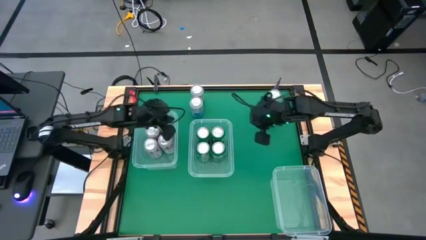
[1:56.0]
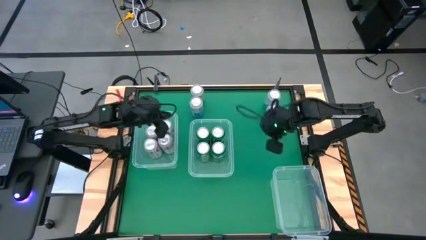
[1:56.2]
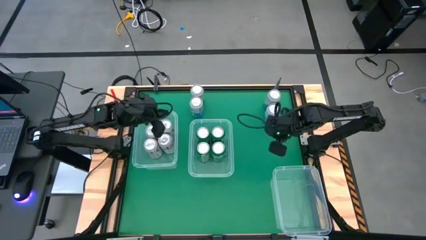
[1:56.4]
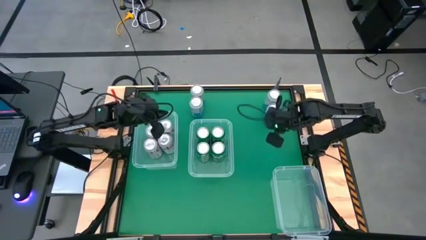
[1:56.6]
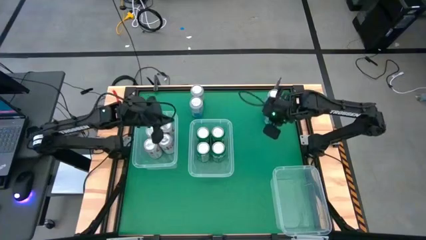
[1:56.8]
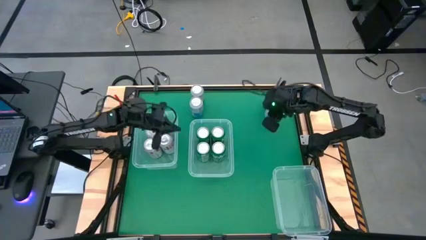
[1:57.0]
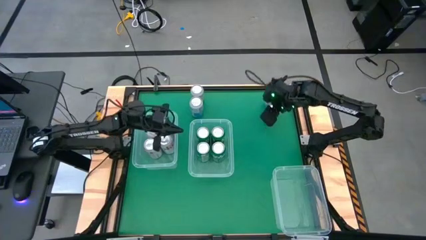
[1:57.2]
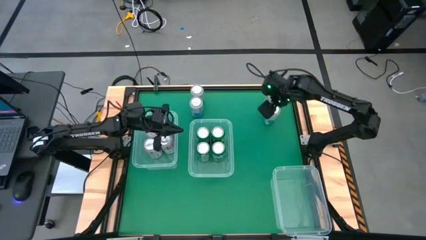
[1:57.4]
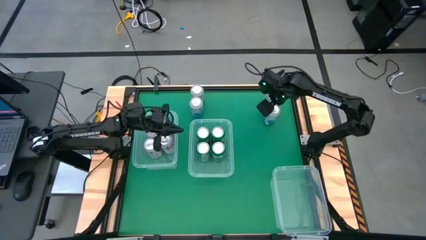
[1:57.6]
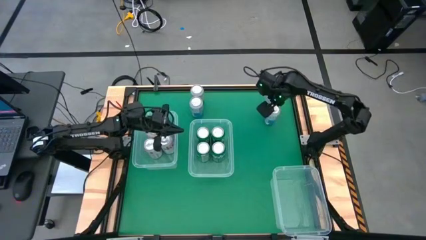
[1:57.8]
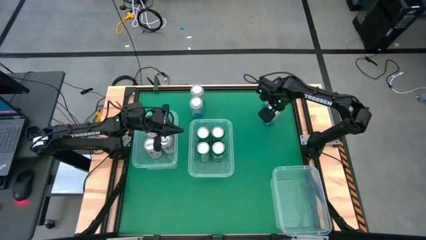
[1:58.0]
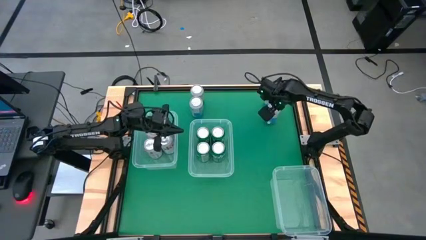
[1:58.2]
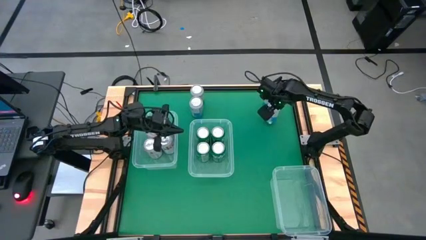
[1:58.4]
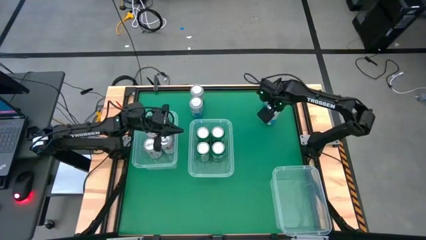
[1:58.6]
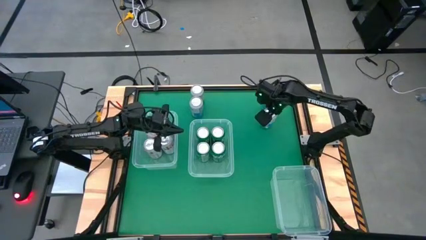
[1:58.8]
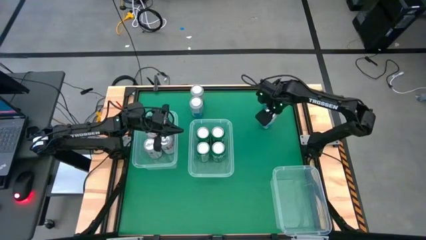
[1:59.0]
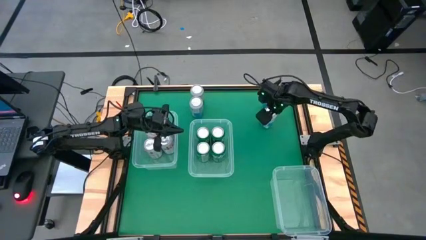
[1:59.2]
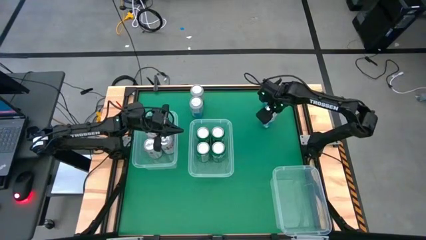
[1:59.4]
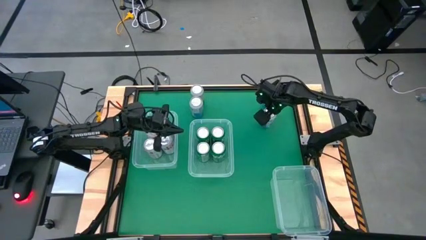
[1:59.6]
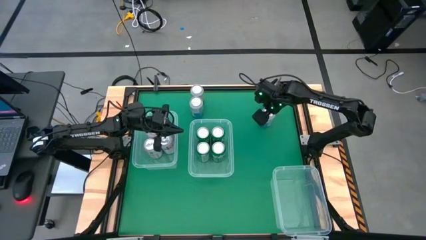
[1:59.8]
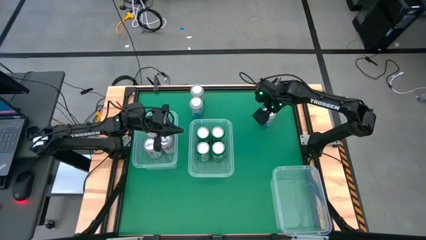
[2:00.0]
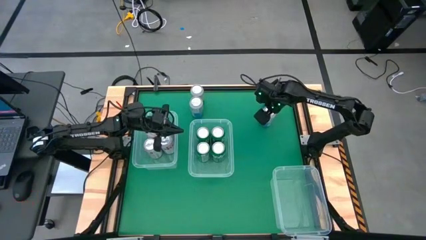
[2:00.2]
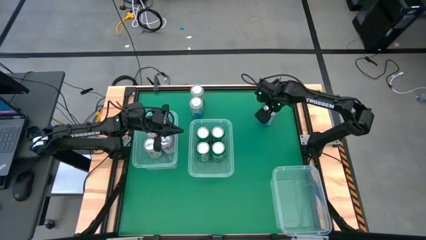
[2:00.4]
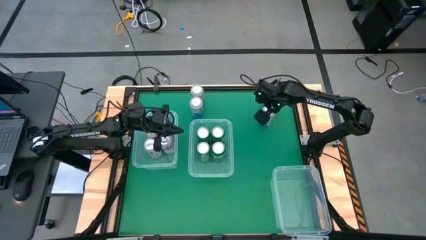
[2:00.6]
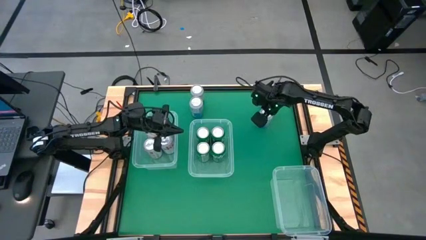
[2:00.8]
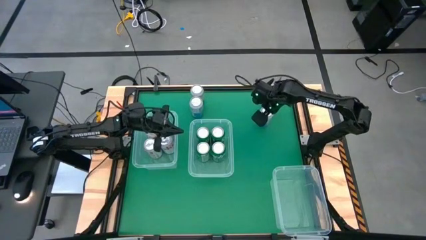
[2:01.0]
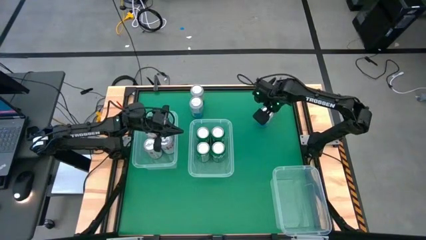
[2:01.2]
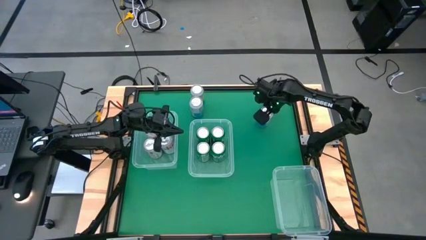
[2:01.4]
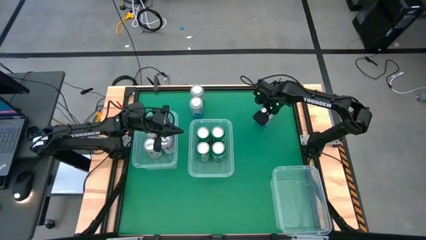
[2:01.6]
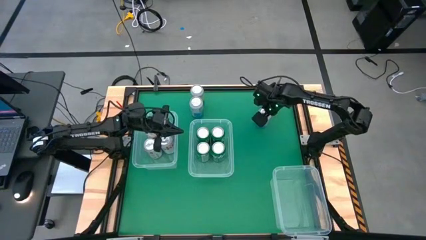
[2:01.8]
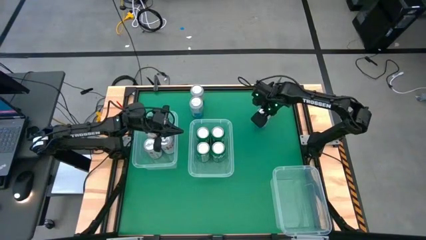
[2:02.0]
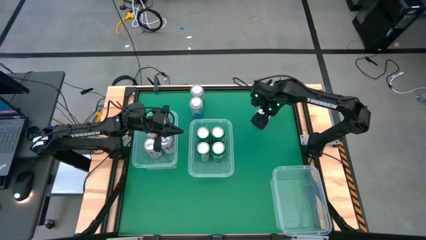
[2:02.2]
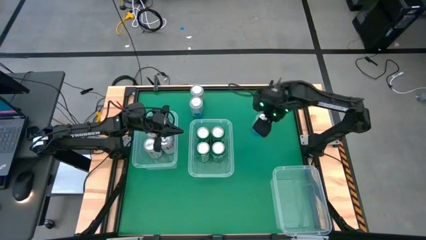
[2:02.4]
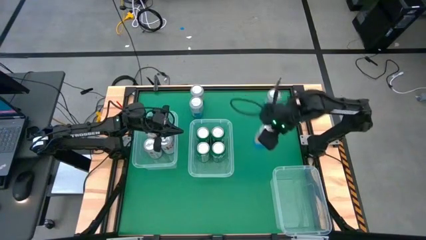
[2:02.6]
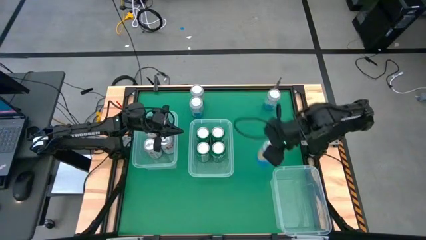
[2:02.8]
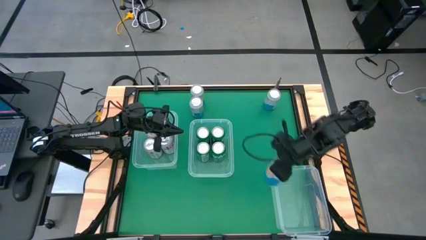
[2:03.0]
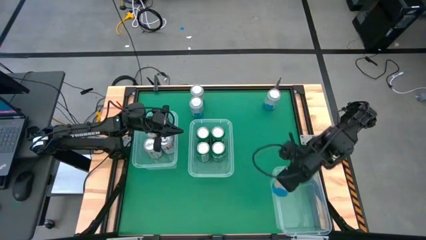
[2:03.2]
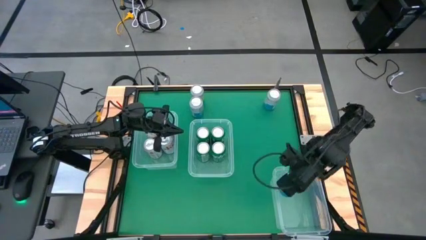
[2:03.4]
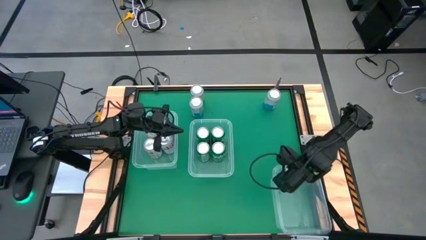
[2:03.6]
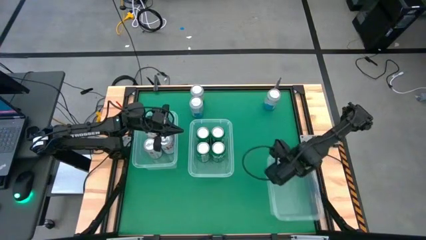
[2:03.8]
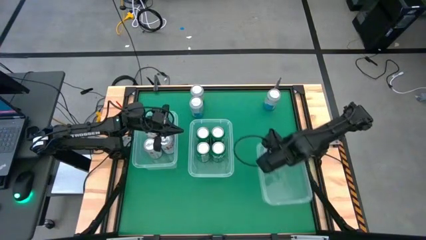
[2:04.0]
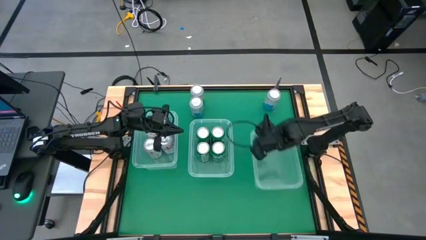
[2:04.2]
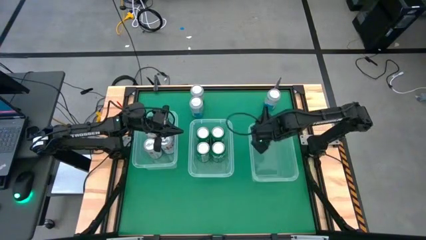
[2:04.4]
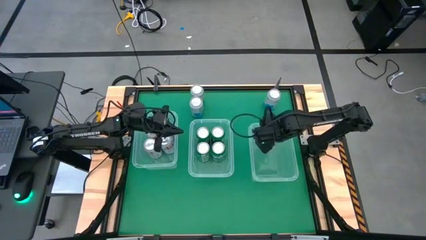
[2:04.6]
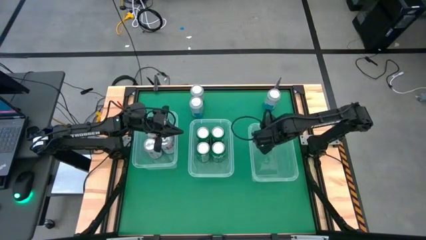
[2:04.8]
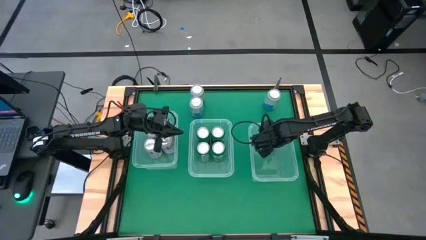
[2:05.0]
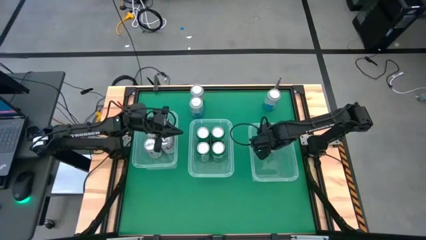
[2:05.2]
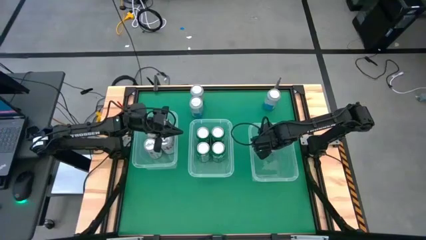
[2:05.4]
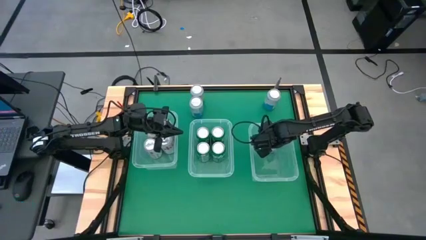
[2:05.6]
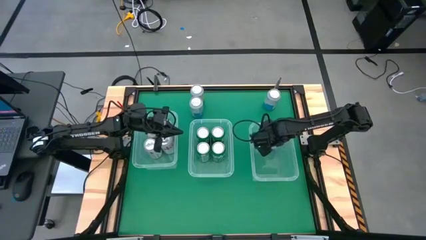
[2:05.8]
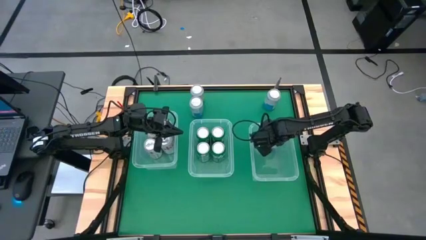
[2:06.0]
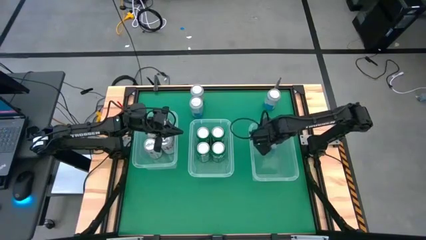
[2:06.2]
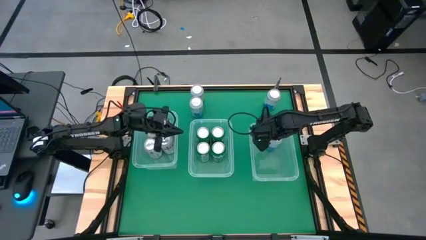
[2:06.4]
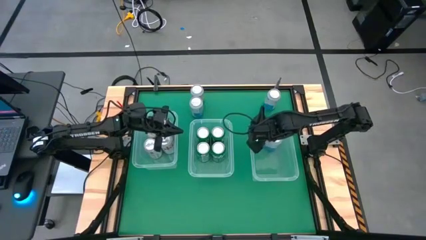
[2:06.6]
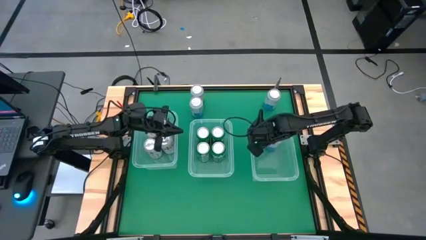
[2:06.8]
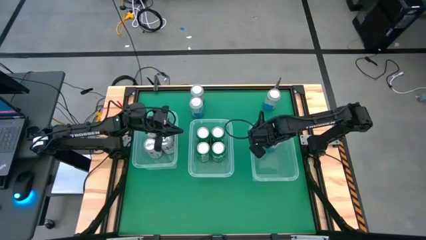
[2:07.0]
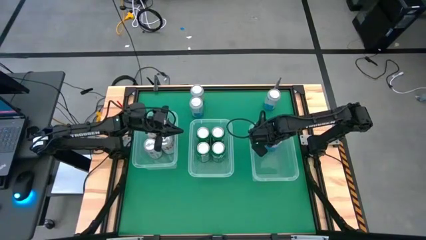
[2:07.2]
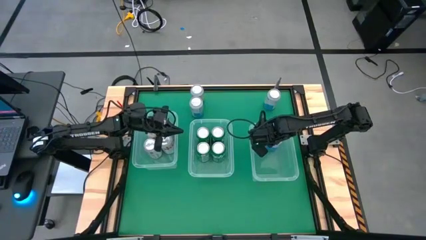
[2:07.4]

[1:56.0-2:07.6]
Task: Sort soda cans
Put the blue soda can into the bottom bin

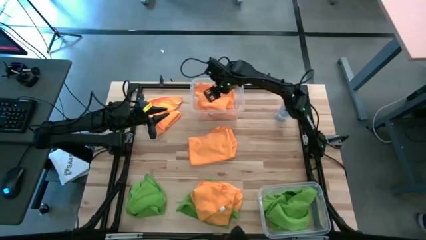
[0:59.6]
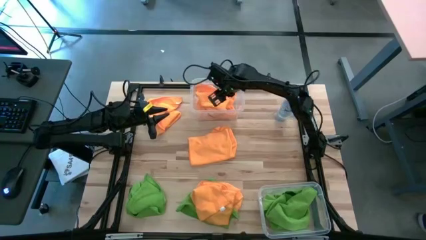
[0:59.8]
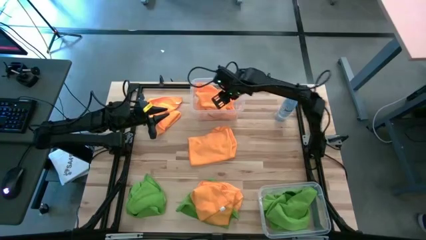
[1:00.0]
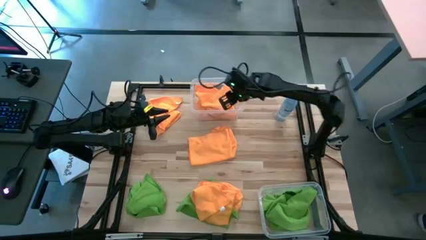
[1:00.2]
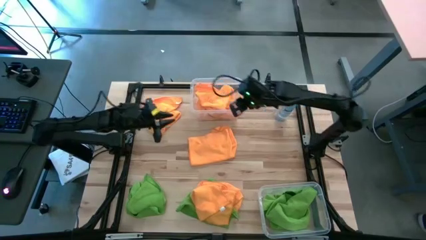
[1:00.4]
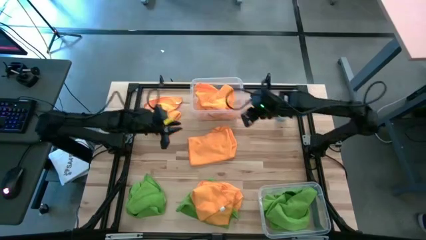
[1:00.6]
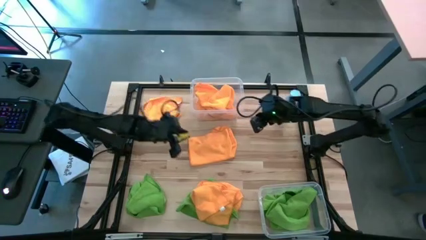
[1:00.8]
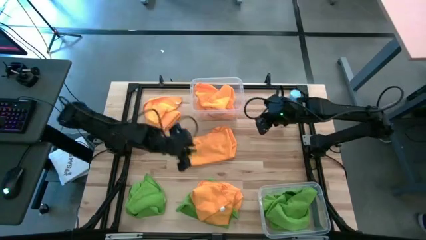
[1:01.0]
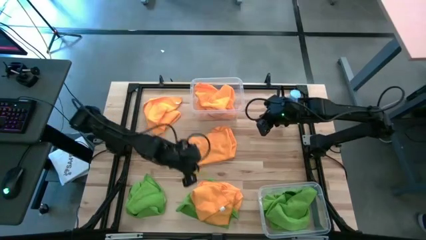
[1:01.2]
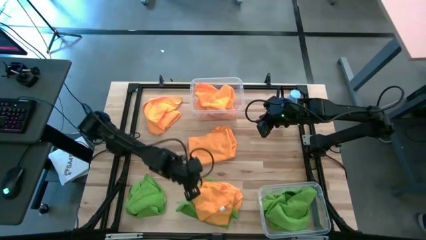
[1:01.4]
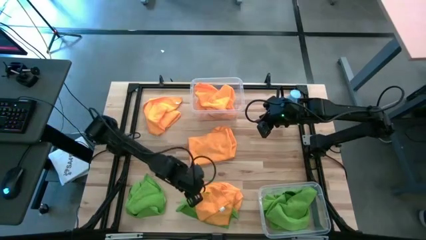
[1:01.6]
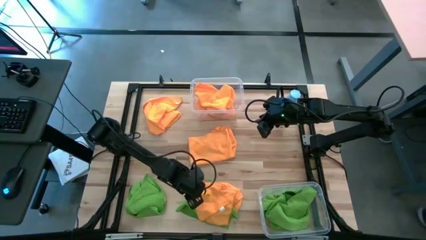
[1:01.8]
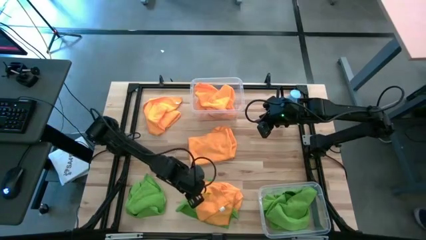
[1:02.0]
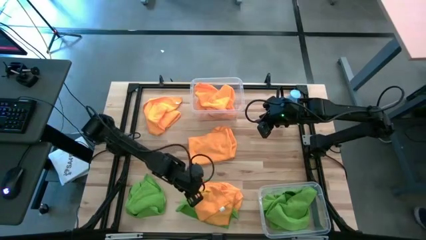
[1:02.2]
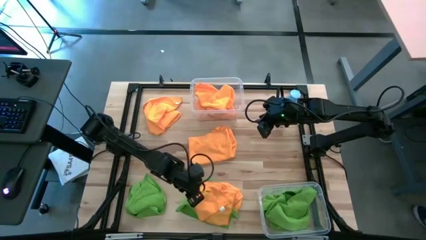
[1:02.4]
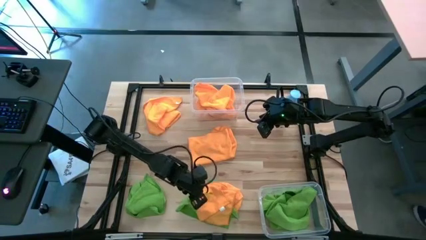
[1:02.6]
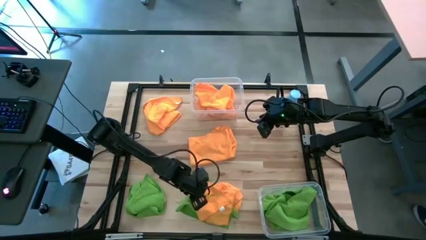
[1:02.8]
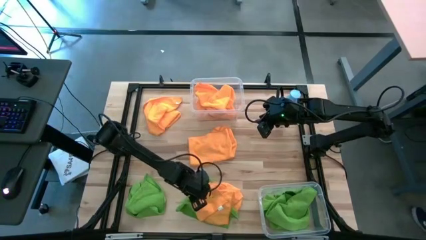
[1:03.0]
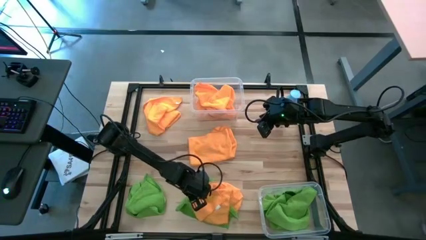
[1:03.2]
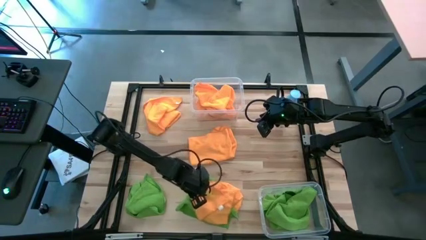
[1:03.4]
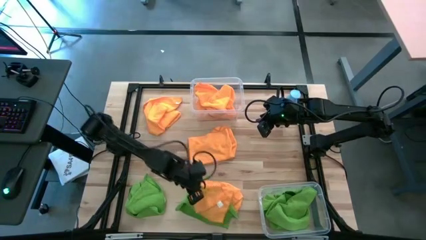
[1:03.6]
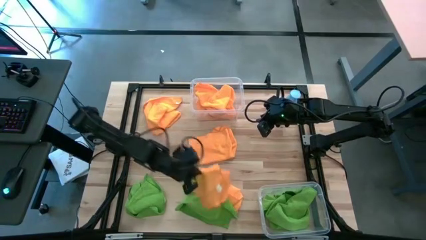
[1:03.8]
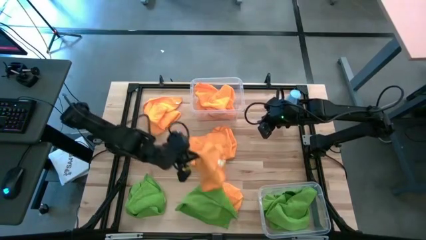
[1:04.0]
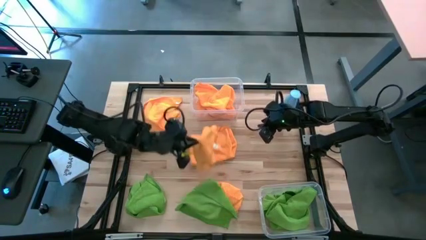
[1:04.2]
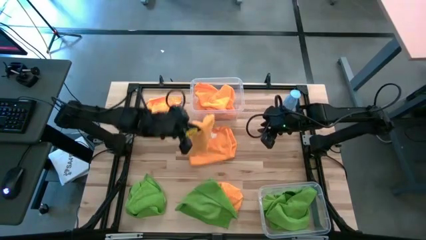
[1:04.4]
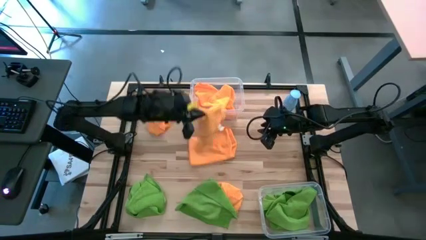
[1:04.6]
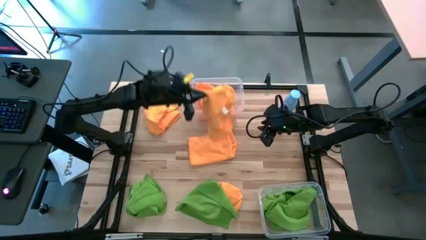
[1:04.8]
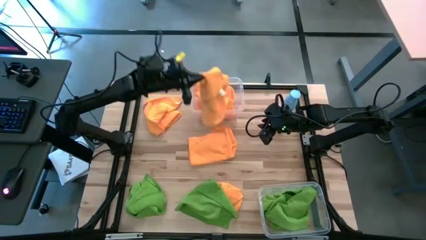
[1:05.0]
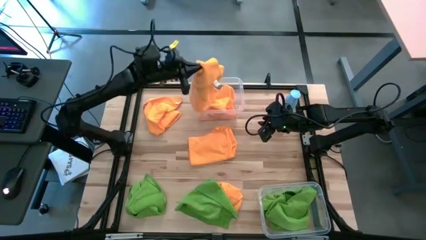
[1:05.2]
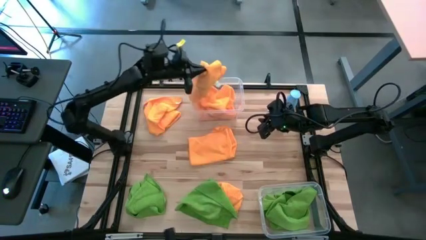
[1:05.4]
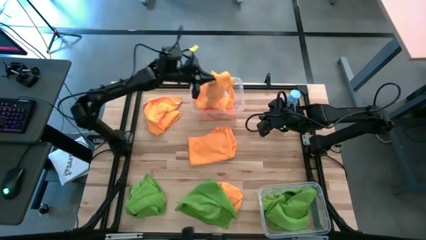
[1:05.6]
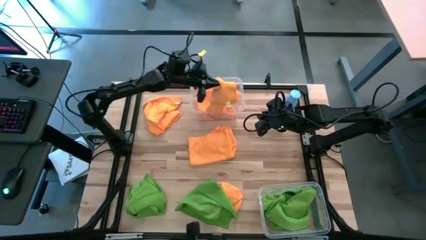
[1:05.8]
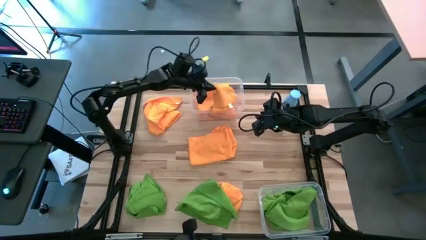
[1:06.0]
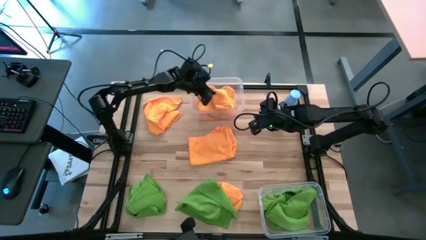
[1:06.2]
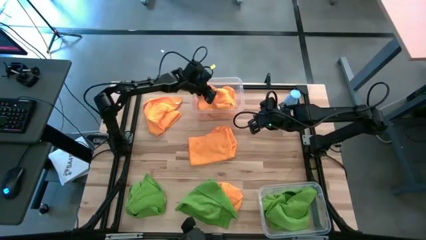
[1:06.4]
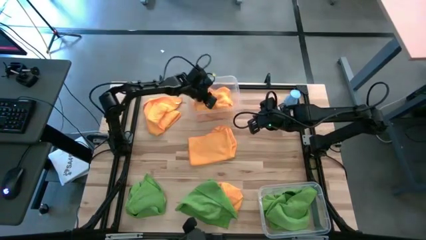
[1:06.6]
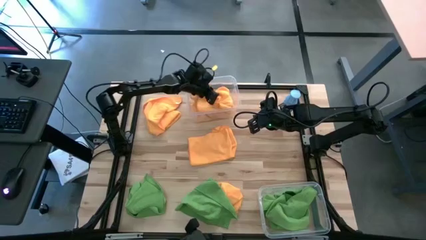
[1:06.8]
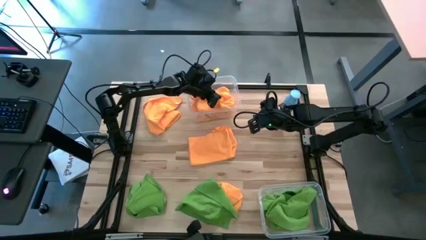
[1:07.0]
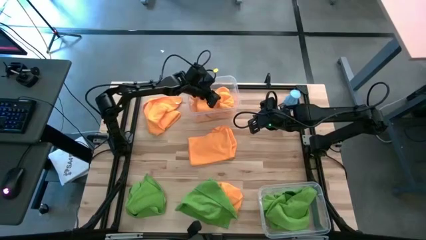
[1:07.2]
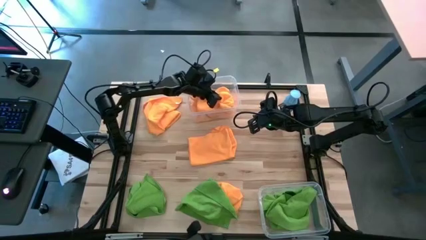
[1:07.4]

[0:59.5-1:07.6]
Task: Sort microfiber towel by color & place in baskets
Put the orange microfiber towel into the top transparent bin
